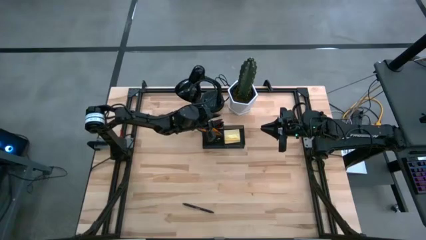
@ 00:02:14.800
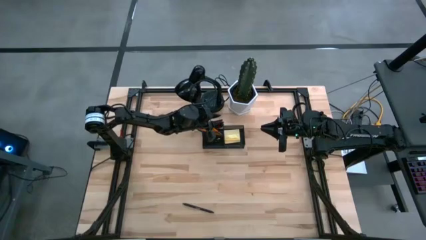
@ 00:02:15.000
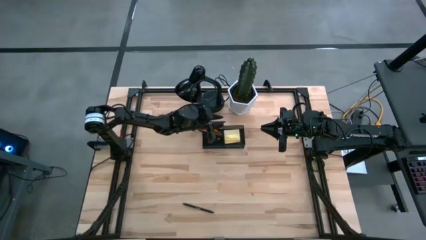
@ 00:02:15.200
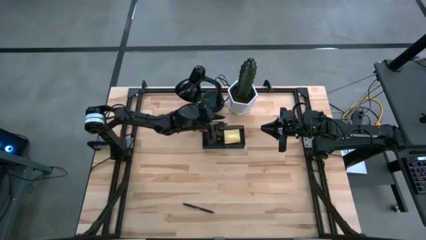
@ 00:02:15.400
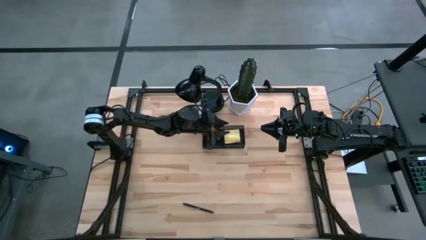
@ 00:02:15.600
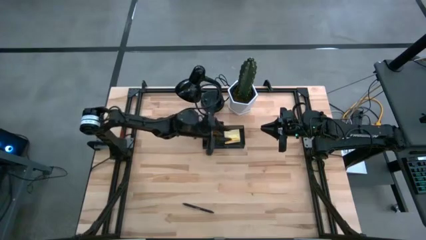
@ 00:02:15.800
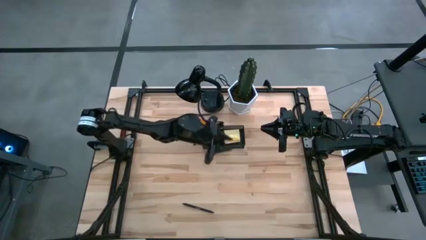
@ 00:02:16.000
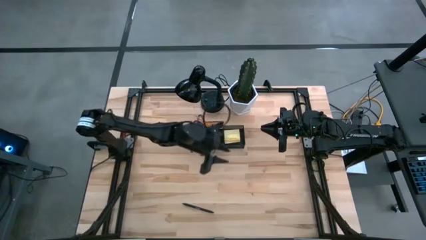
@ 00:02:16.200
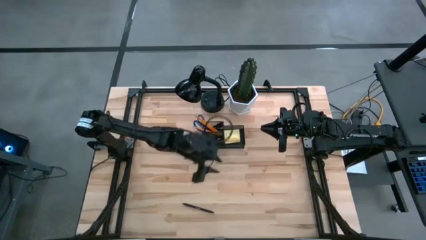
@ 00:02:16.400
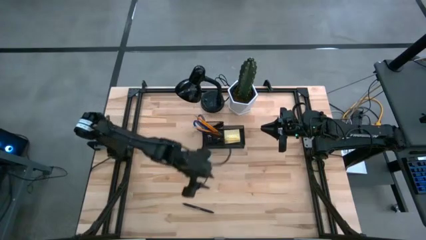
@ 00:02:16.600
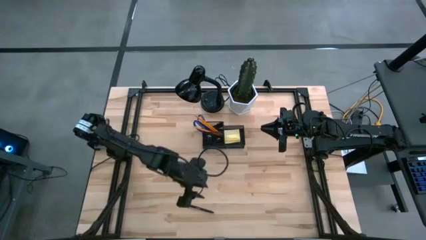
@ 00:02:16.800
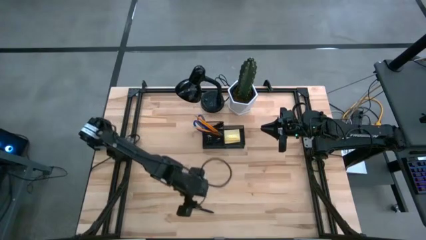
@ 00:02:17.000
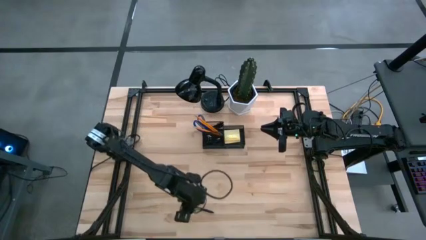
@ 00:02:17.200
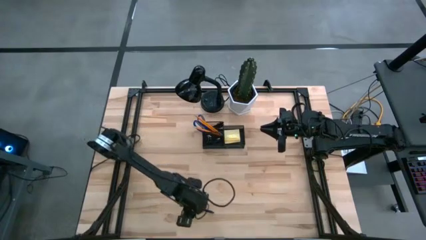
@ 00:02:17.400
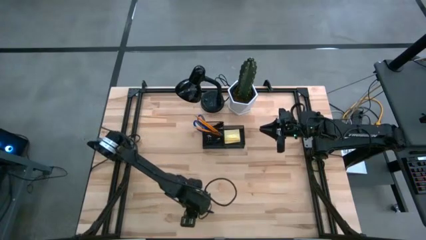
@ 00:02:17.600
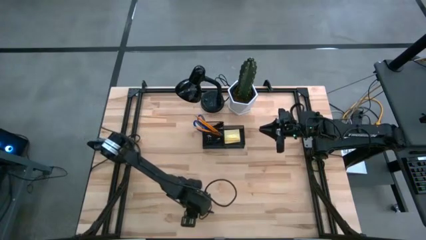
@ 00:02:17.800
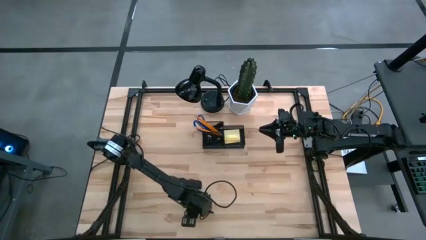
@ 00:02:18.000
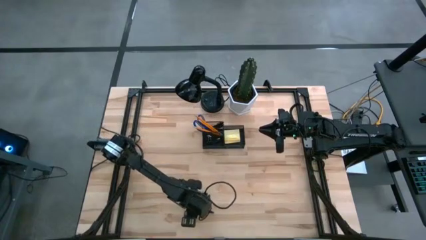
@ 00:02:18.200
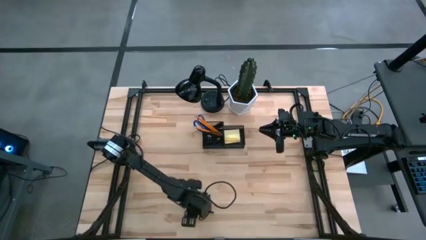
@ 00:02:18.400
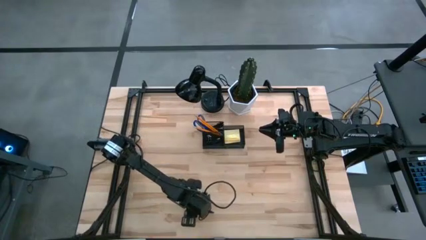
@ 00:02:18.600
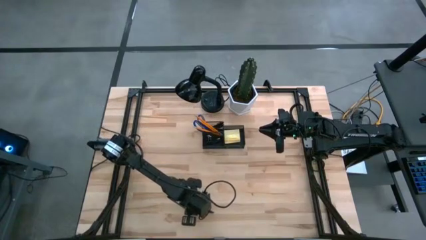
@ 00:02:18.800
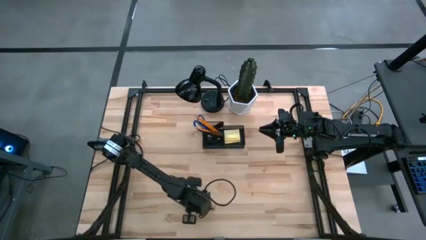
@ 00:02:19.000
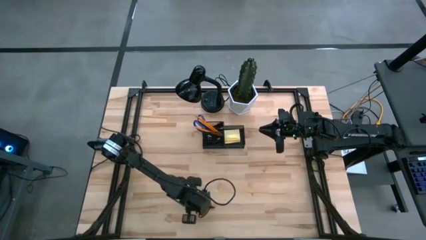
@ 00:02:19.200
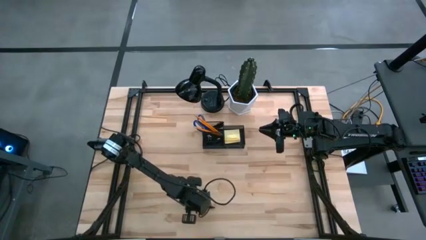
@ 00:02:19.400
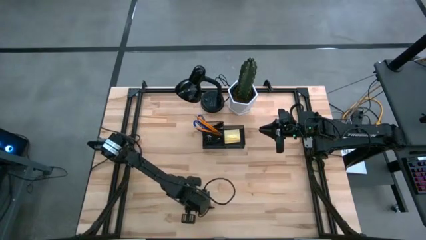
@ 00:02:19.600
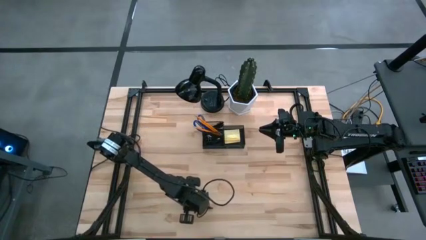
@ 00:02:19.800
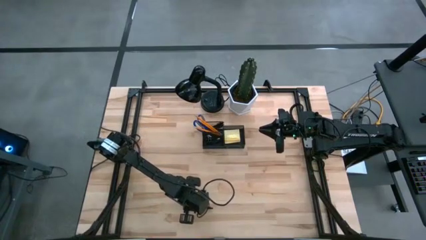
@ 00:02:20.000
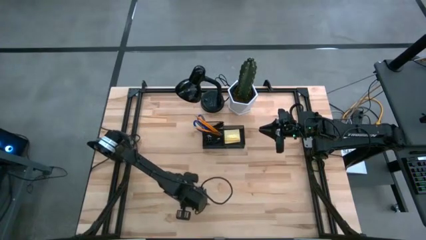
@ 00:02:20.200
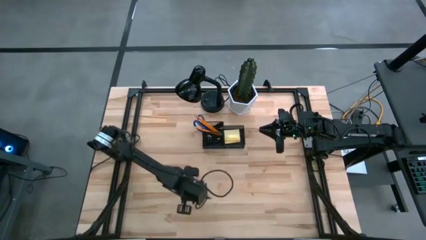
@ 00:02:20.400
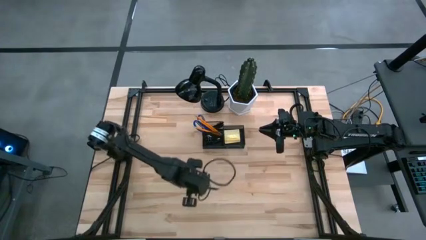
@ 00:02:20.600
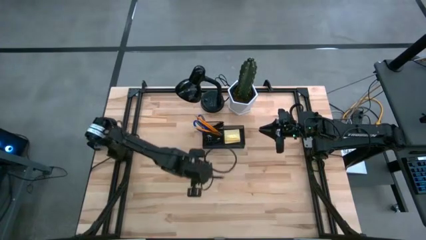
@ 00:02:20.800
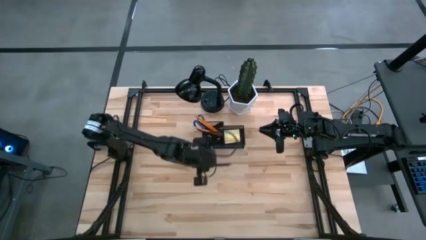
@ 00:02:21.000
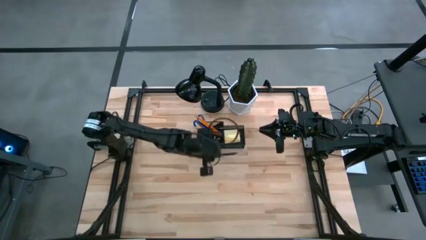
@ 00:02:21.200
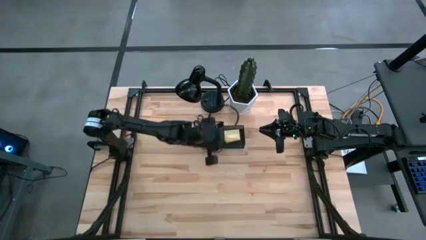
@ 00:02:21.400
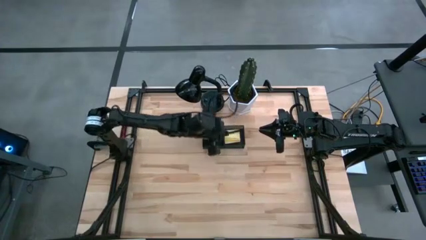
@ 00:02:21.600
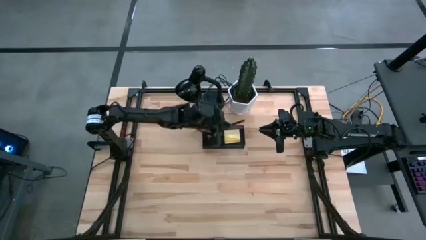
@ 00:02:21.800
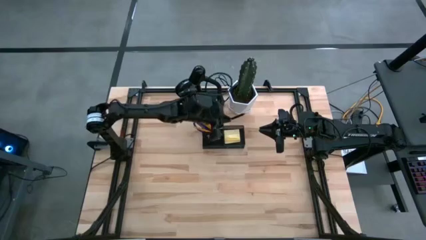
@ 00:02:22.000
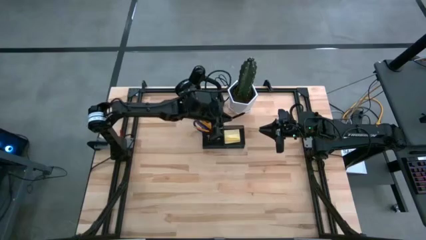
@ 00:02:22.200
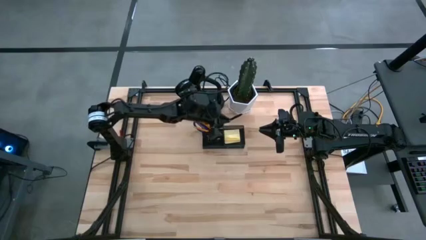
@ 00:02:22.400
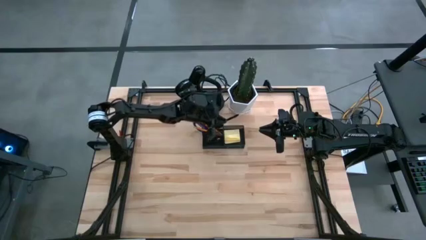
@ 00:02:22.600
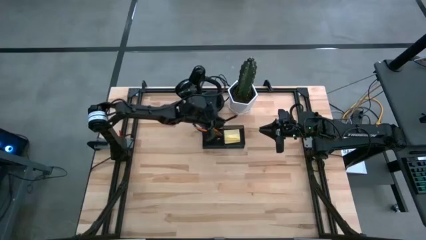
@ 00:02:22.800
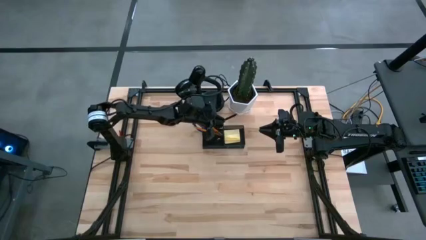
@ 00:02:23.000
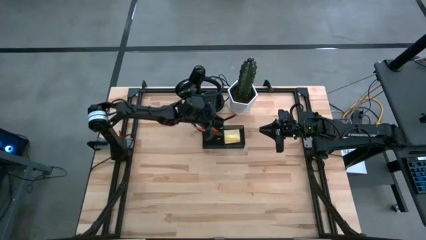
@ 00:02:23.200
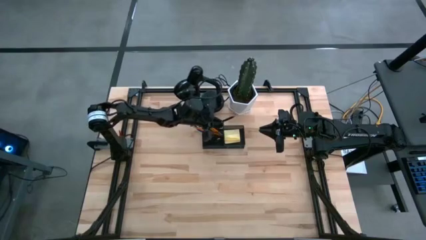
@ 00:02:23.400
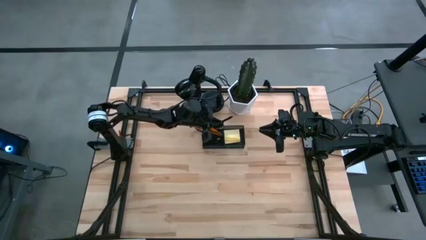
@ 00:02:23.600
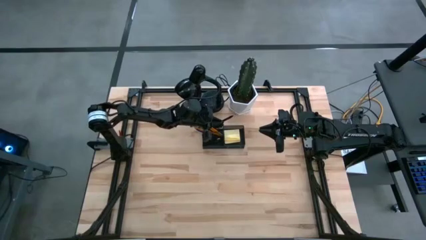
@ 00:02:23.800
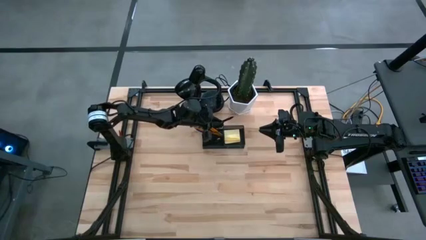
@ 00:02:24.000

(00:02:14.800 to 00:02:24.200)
Task: Pick and place office supplies into organizer
Put the black pen into the black desk organizer

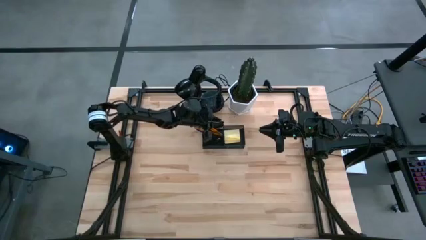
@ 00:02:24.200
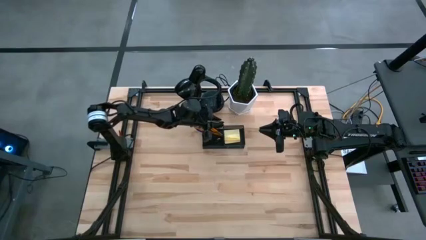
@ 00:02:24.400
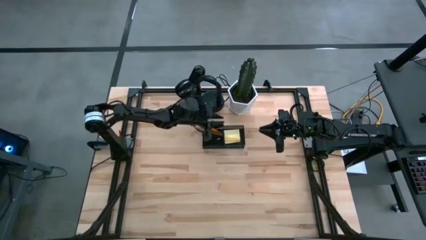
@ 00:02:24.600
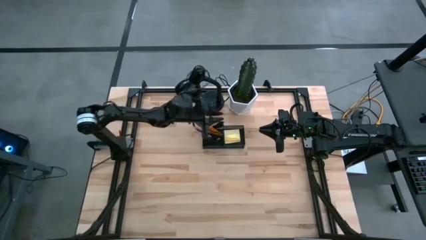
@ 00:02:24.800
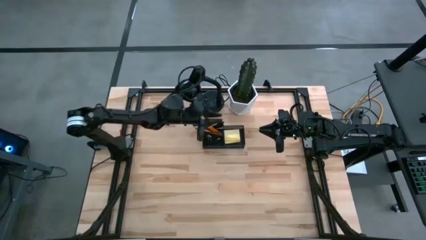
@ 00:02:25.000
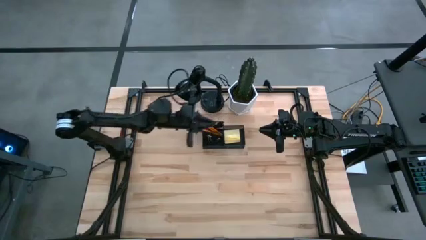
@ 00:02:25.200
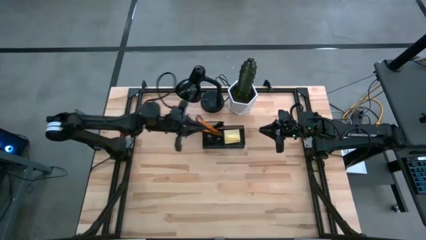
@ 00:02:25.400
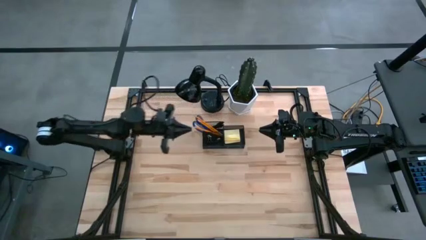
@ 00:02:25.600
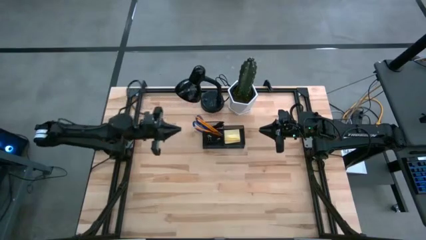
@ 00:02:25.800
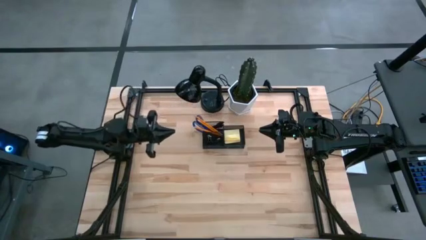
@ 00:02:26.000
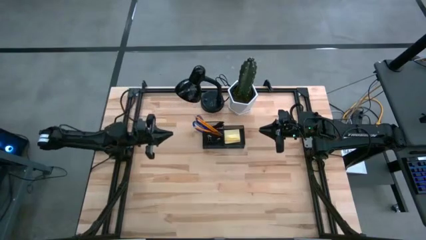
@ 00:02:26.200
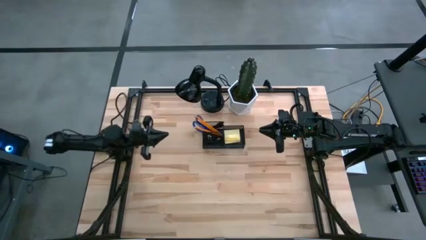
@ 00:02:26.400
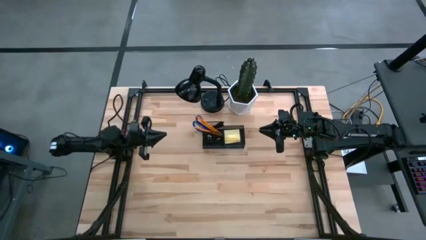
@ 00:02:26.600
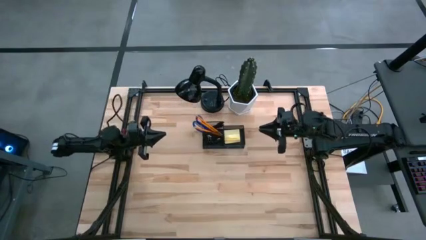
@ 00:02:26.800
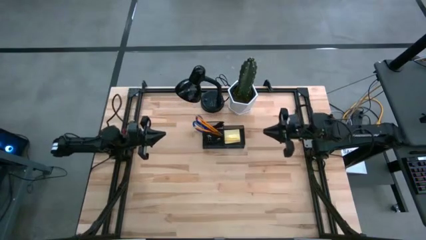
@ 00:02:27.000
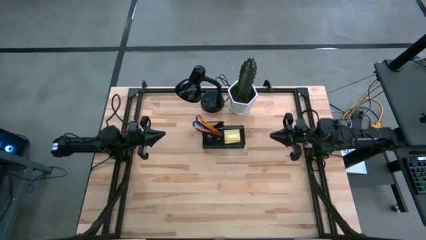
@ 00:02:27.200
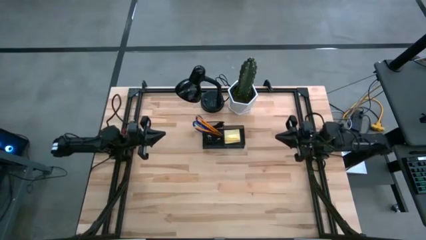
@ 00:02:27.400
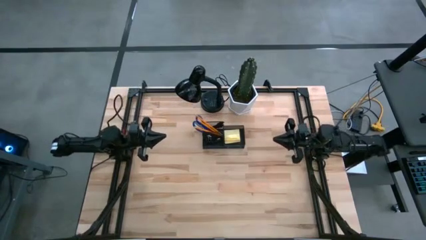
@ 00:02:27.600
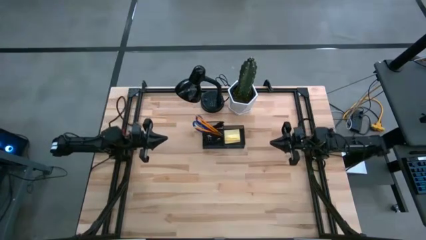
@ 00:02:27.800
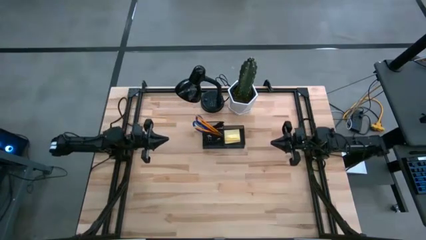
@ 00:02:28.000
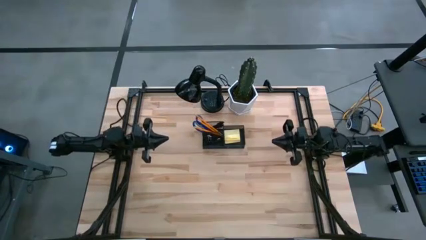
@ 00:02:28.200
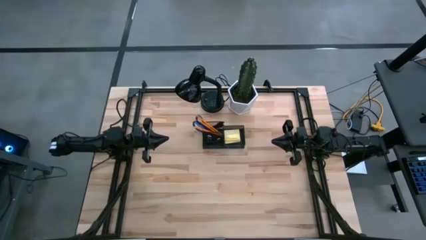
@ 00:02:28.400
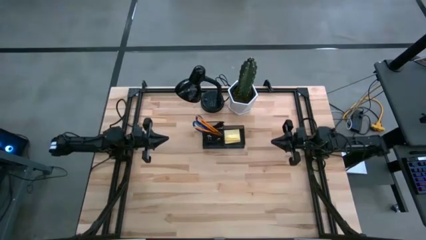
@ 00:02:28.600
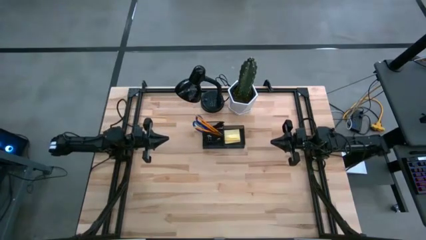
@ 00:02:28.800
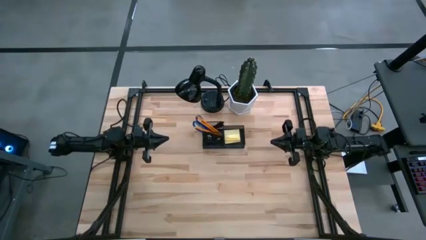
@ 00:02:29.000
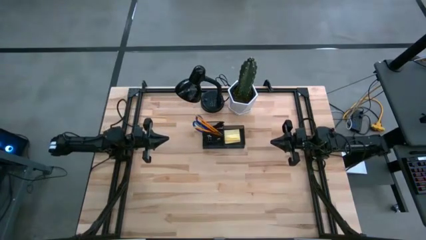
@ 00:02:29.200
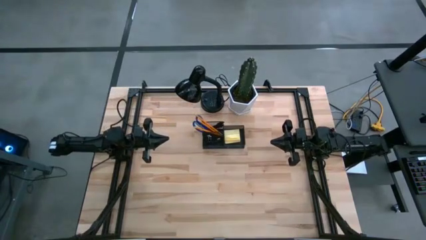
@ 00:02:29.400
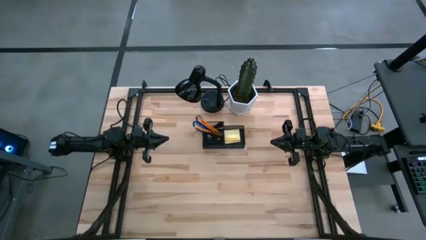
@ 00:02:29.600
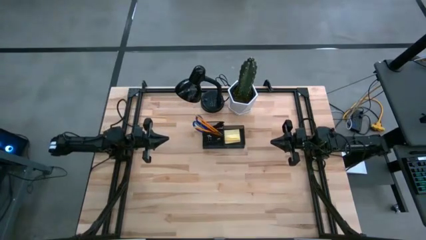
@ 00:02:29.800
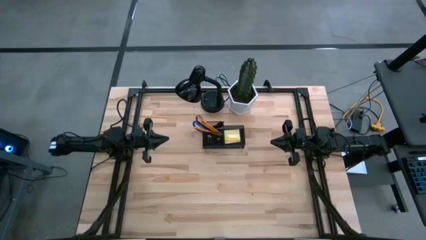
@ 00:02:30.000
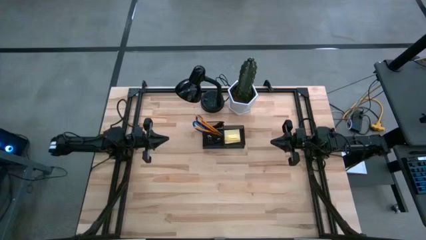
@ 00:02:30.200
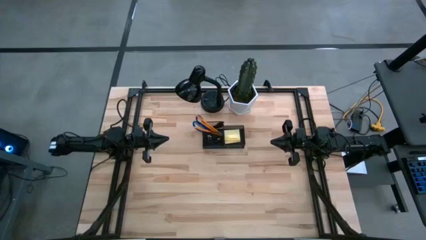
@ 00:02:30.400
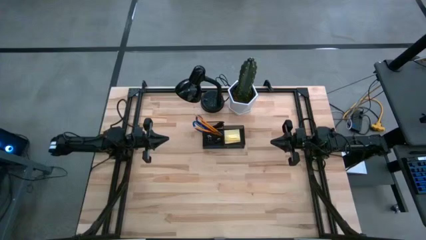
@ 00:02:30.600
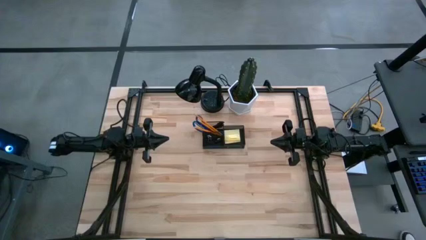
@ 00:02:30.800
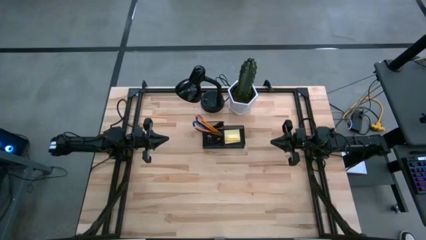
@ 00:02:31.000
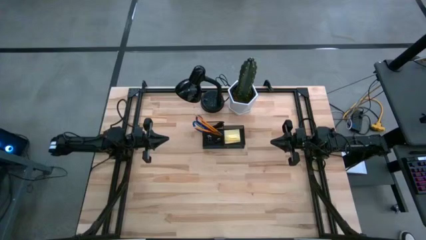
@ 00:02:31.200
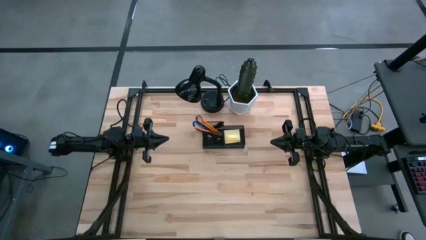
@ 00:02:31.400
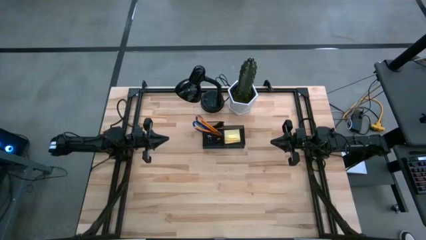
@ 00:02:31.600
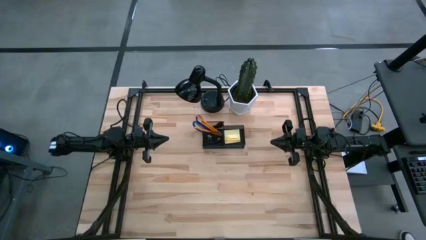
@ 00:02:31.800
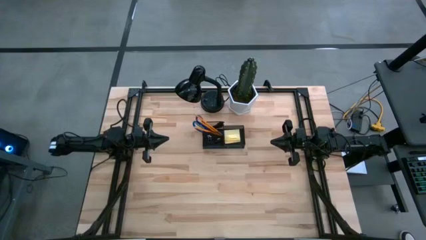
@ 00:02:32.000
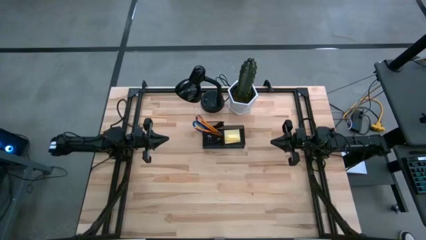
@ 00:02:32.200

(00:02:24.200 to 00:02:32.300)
Return to Home Position
